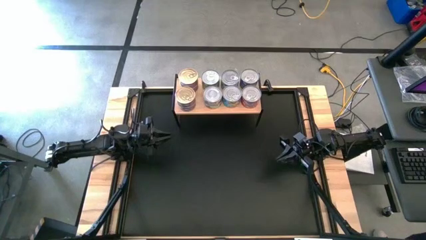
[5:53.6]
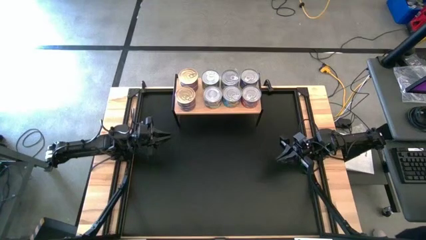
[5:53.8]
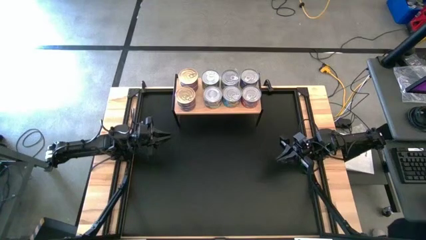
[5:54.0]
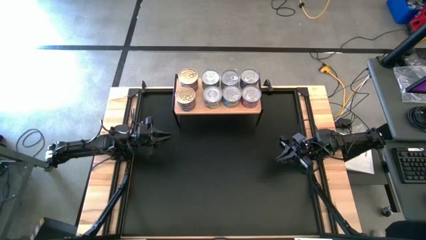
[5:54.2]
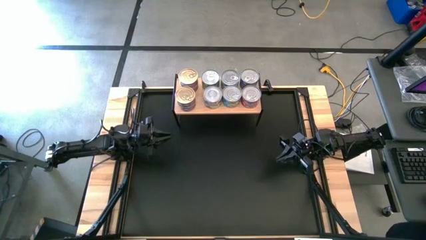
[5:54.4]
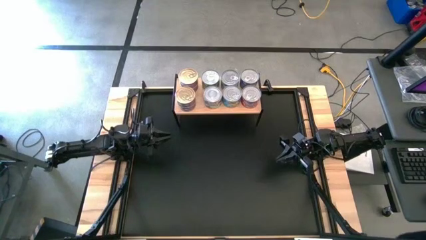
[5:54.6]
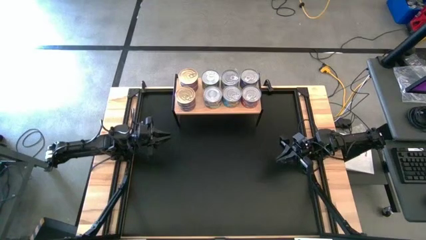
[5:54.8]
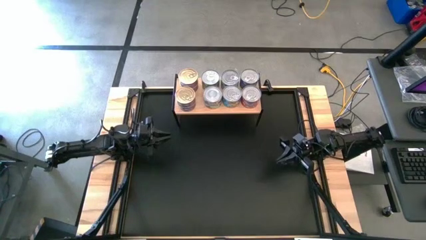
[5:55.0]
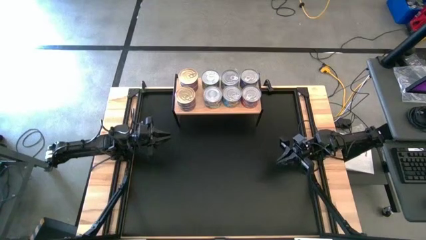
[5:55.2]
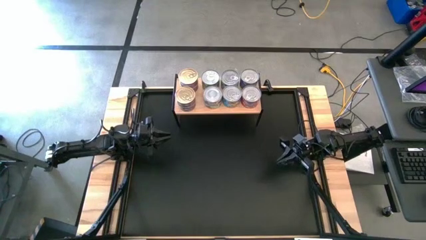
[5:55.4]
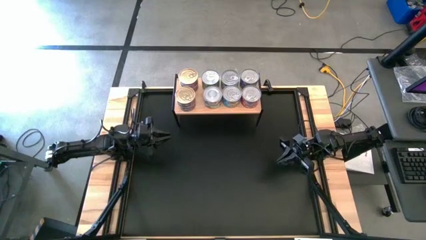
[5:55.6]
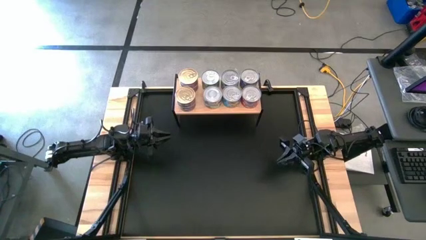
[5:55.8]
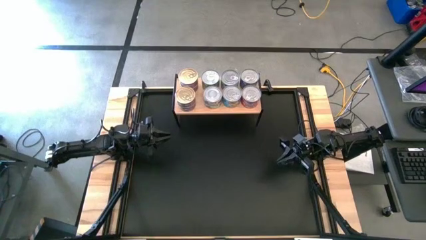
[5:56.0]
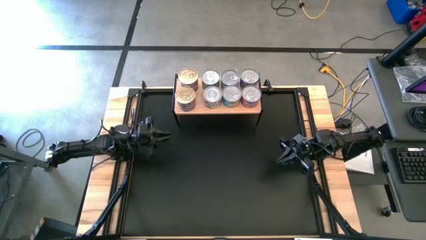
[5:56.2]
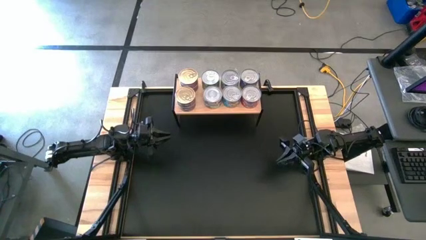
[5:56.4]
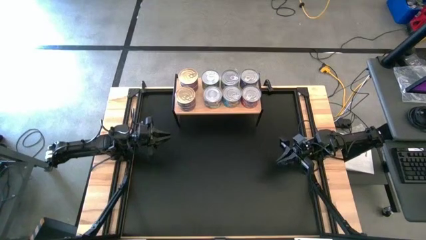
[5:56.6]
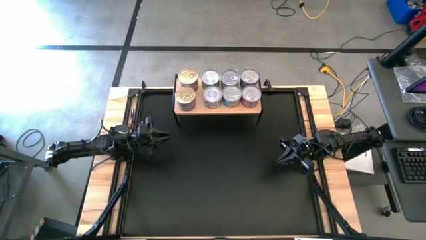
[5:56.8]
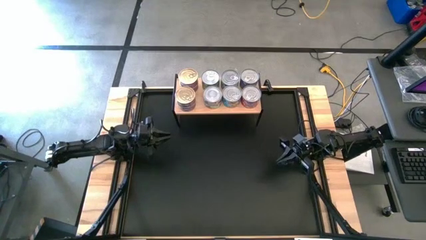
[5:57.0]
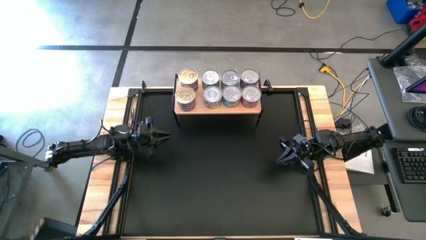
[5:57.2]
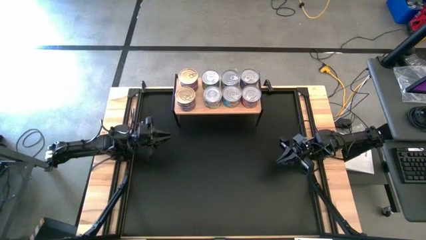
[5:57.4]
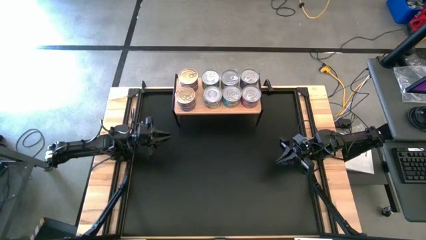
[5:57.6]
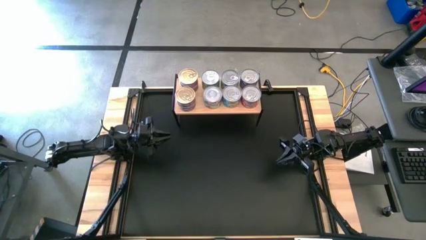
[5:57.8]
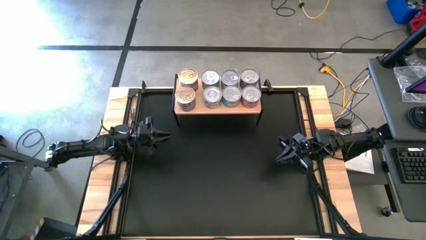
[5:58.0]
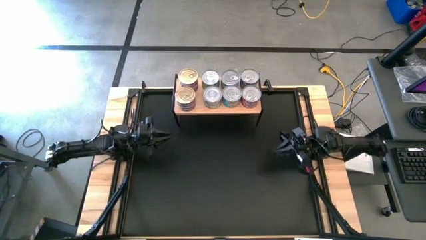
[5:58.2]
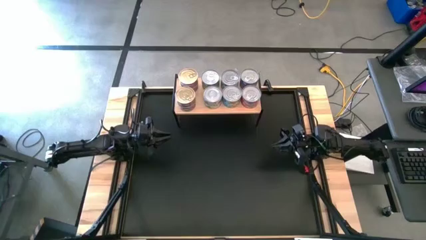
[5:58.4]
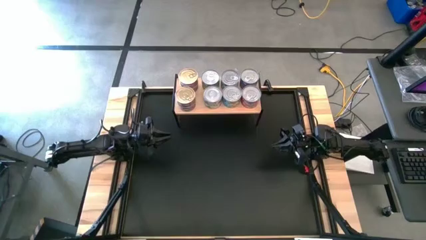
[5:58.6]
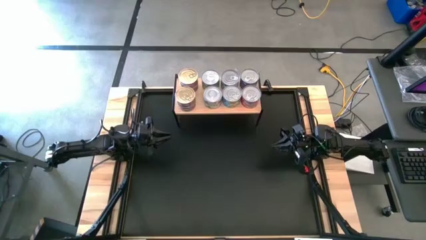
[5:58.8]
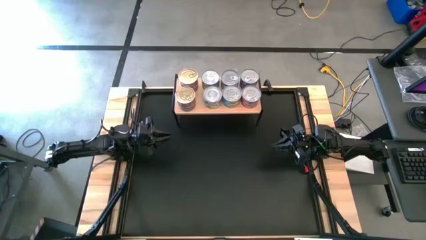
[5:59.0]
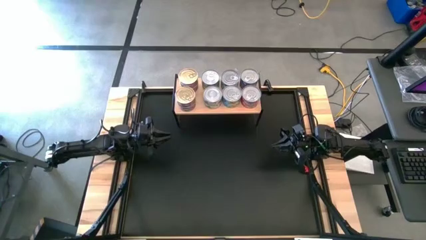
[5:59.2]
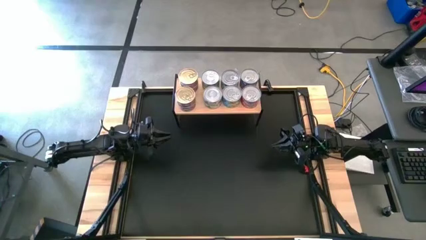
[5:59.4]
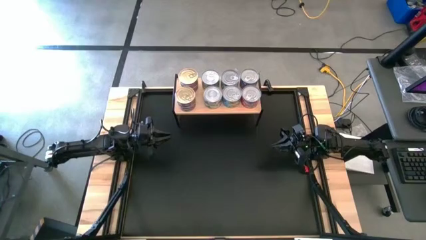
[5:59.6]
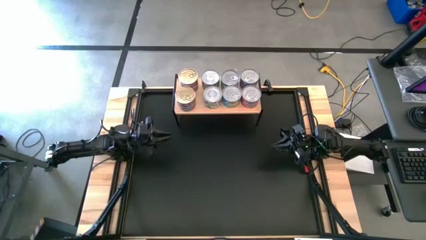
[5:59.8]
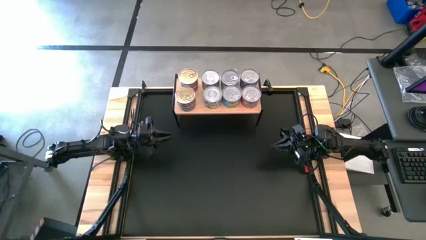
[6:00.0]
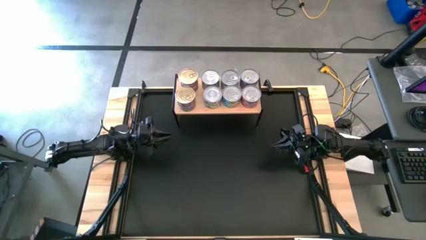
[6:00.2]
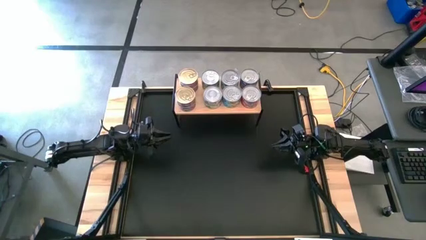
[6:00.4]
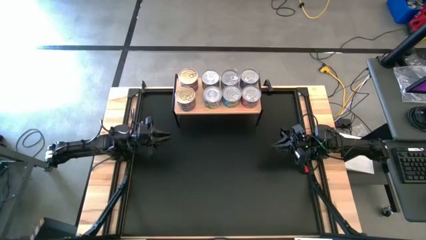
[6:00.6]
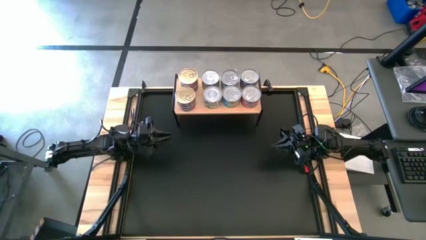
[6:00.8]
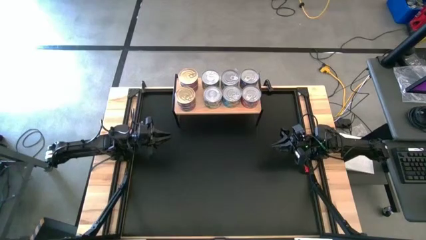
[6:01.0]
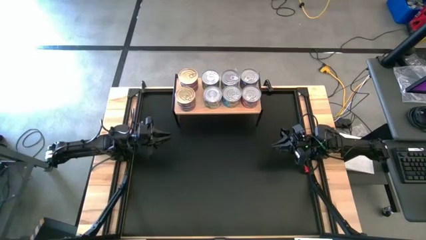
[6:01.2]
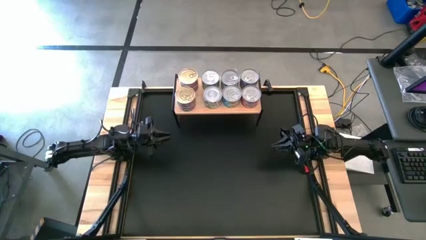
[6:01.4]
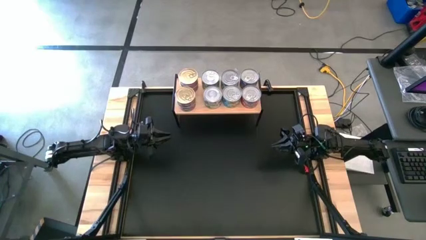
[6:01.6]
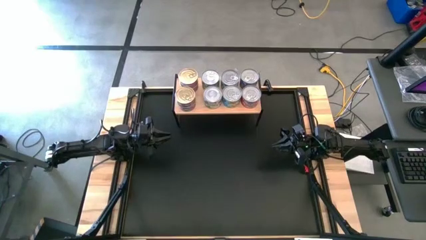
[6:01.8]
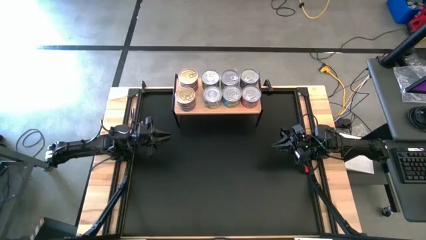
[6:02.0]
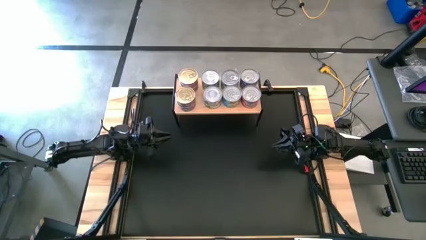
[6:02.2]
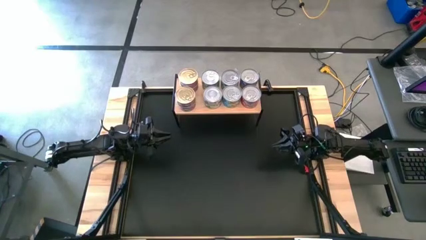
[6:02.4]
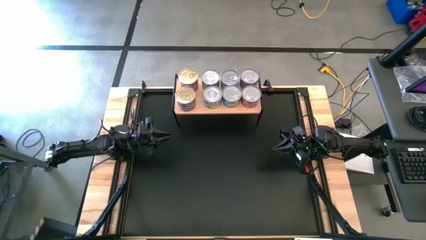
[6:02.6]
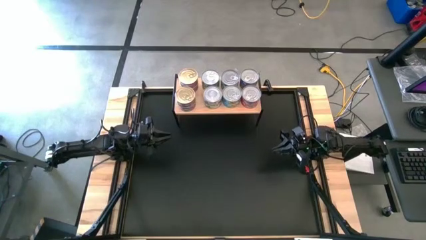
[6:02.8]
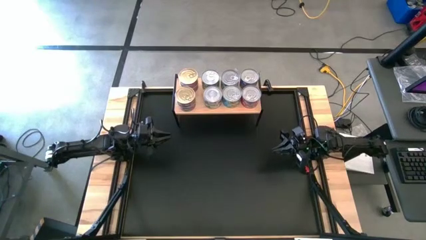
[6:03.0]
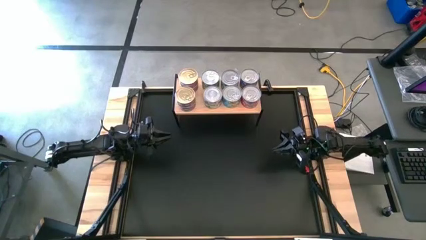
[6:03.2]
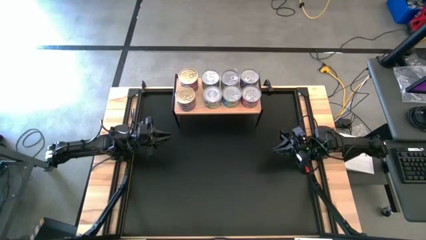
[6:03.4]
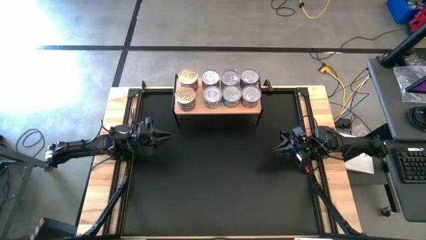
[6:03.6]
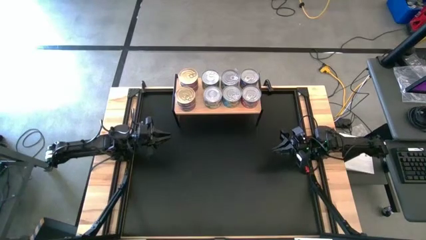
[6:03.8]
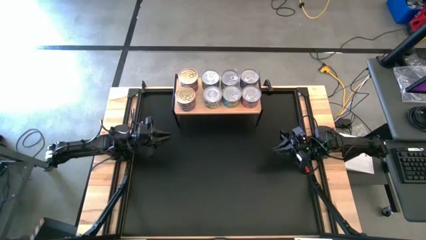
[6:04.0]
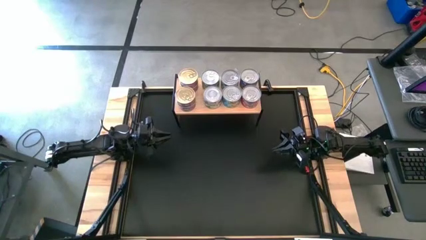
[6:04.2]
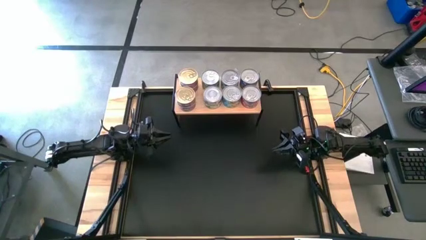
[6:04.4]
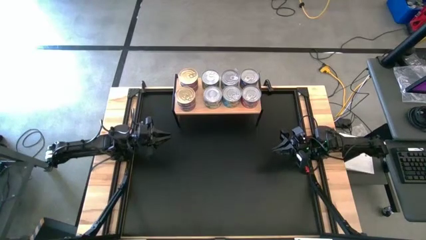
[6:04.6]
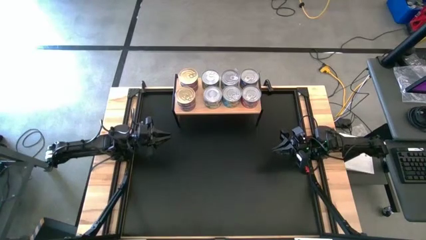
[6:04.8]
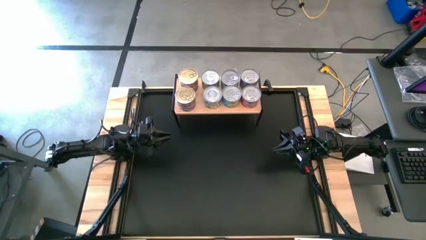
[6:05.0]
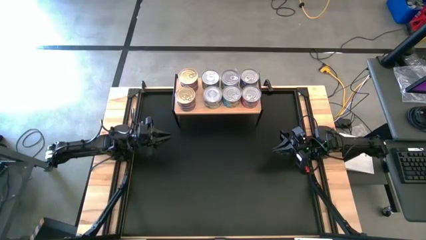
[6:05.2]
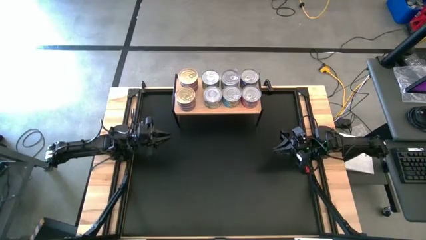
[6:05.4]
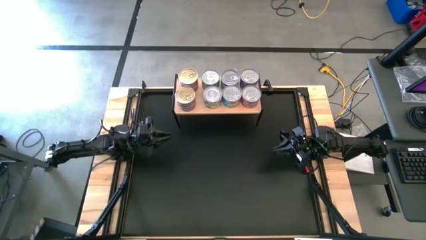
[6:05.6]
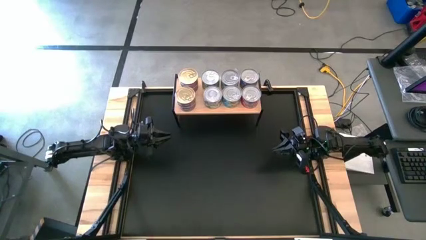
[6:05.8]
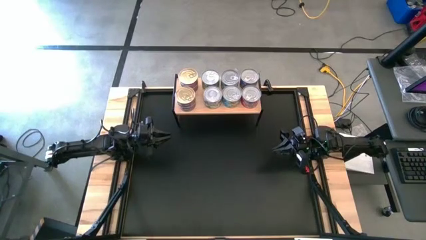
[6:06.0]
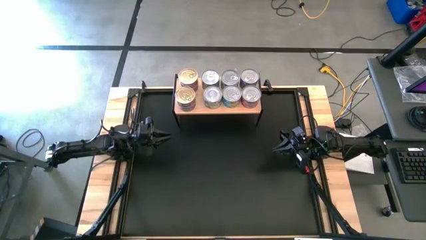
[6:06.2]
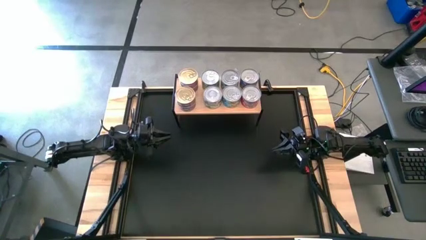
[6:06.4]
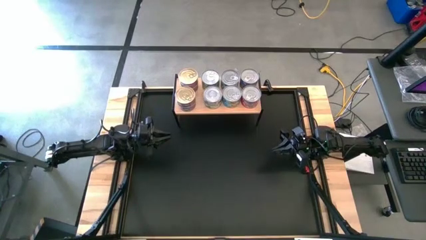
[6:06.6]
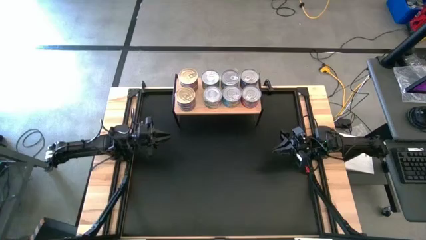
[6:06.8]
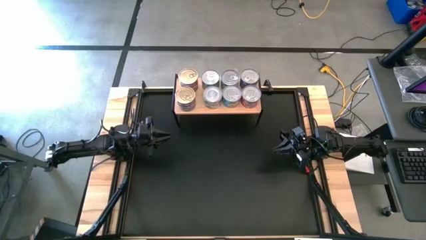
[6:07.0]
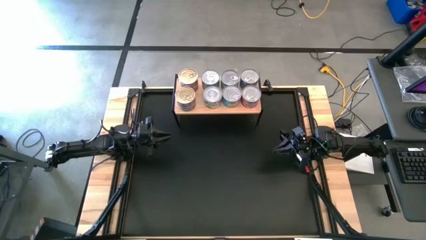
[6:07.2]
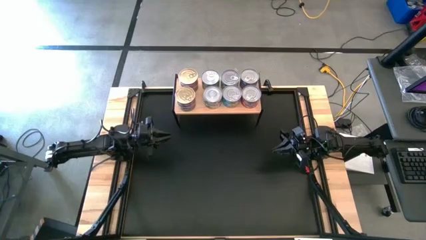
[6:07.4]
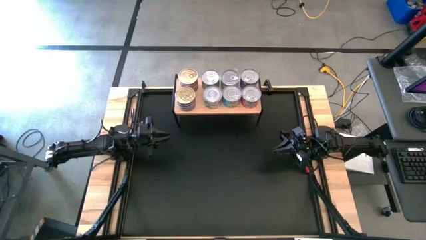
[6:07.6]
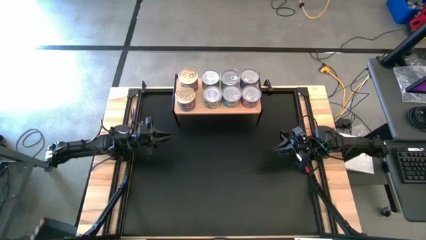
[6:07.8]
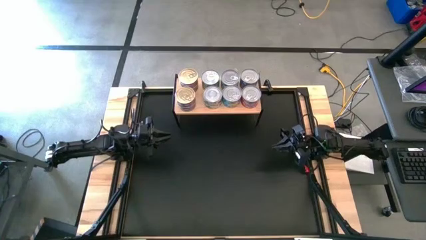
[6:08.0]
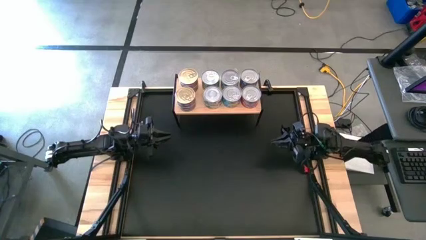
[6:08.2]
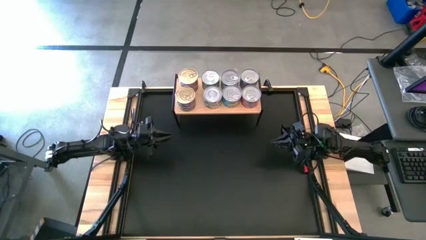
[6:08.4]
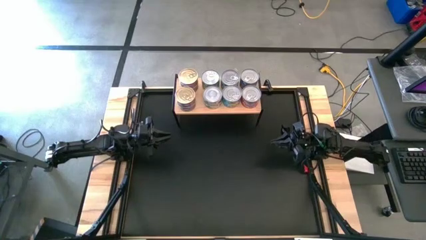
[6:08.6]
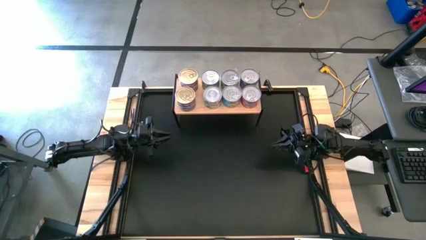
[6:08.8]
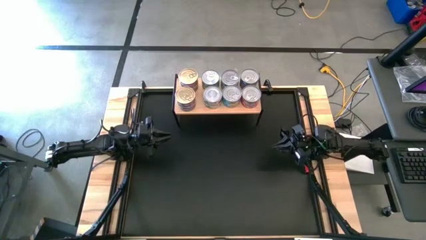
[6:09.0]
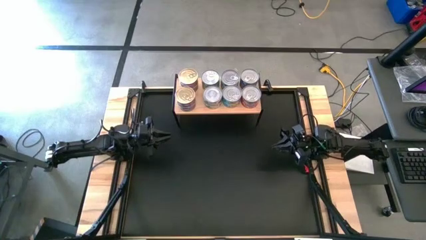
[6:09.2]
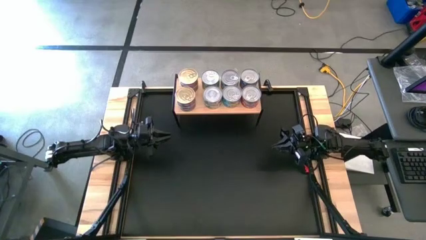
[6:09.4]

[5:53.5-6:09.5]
Task: Stack canned seafood by type on shelf
Return to Home Position
